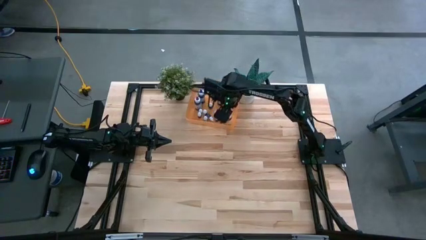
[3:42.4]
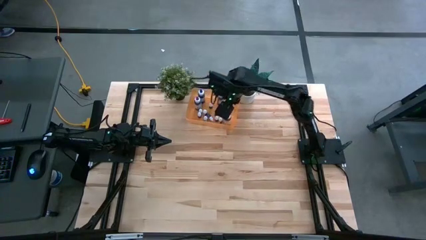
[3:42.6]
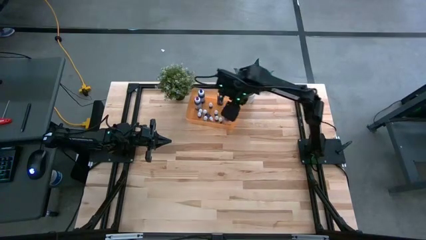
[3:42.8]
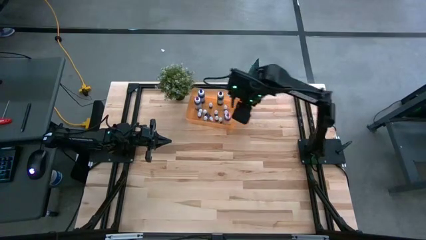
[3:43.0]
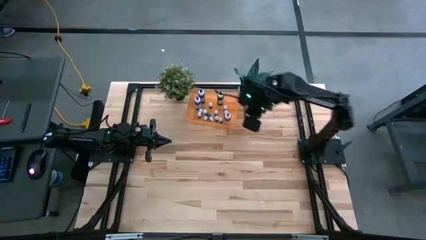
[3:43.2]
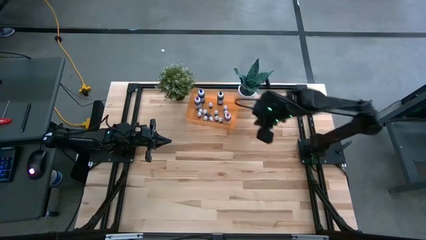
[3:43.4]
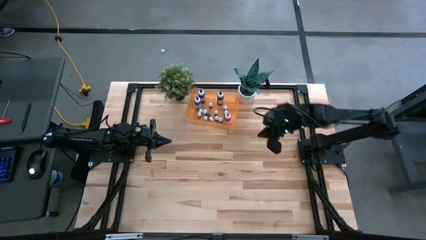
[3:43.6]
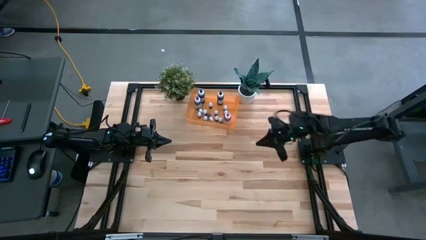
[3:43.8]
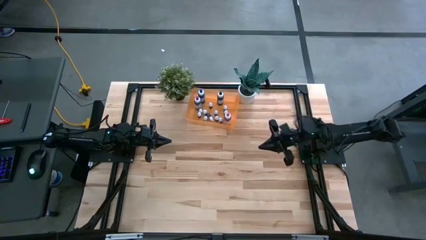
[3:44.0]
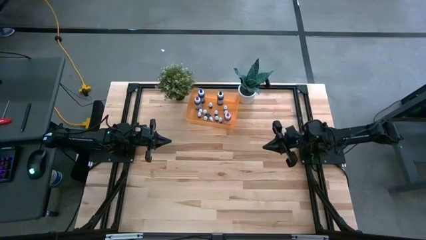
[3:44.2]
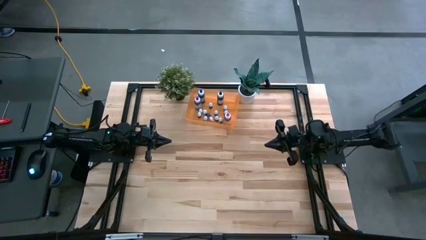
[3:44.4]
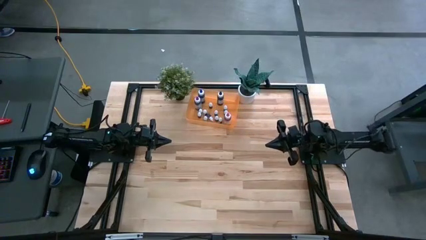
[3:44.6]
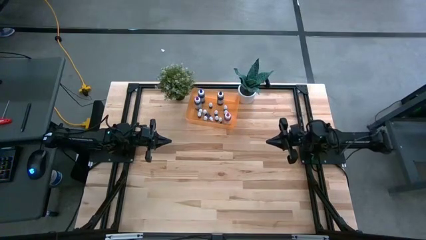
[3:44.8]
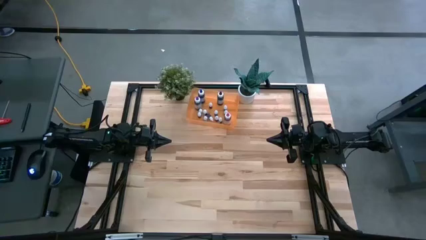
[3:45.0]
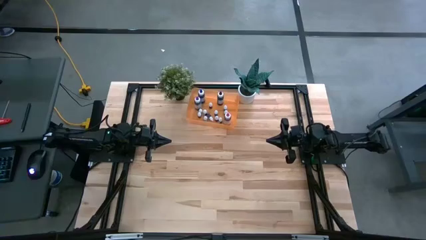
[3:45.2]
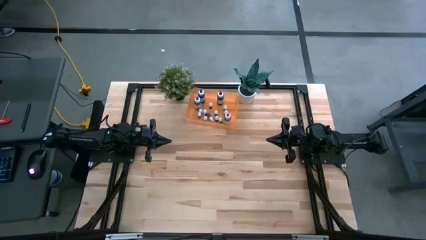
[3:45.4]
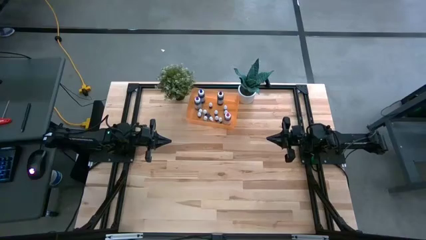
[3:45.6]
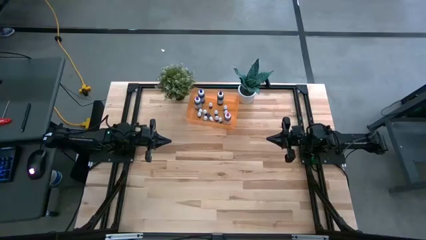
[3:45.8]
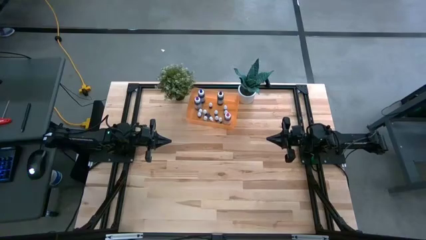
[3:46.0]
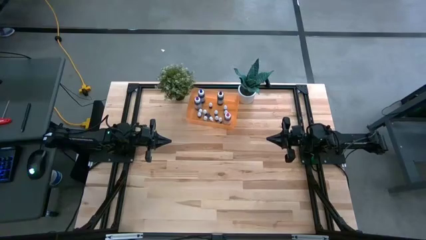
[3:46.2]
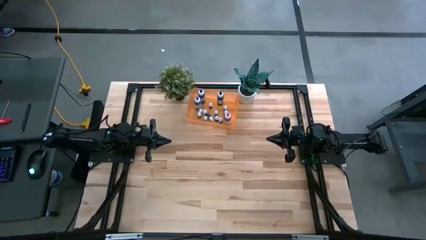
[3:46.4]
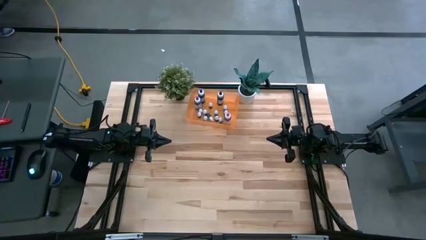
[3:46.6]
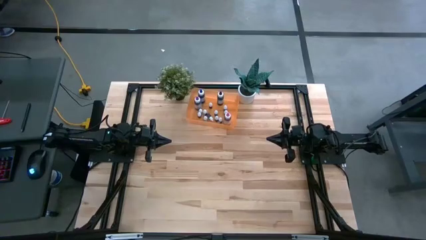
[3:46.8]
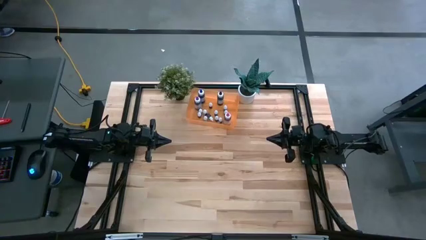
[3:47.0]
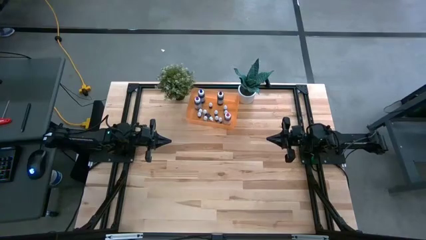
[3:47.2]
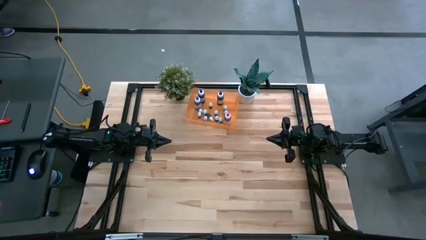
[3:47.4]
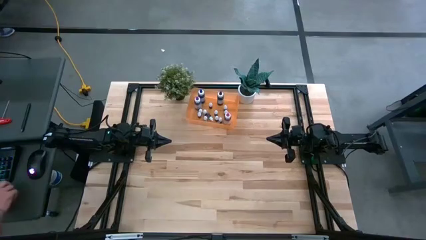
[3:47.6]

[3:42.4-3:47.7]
Task: Pick & Place food coloring
Return to Home Position

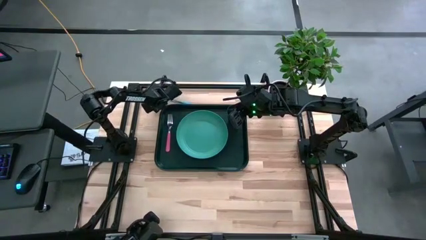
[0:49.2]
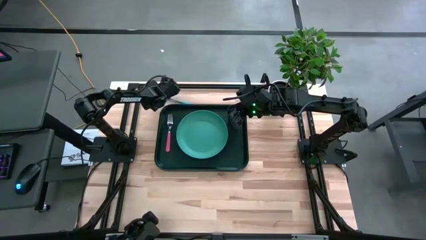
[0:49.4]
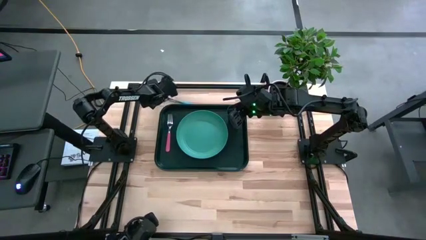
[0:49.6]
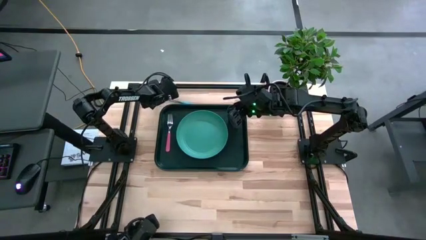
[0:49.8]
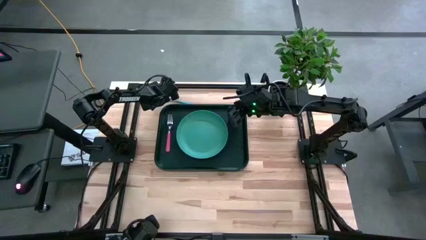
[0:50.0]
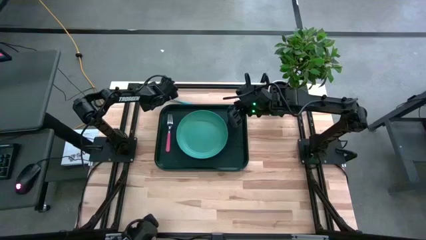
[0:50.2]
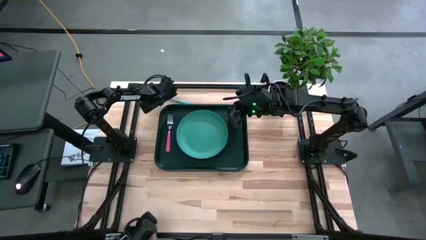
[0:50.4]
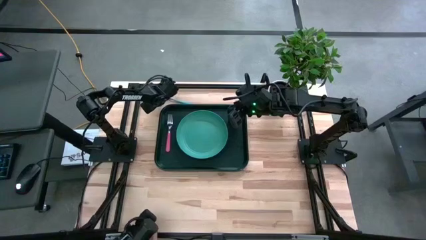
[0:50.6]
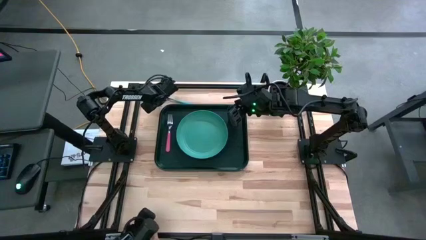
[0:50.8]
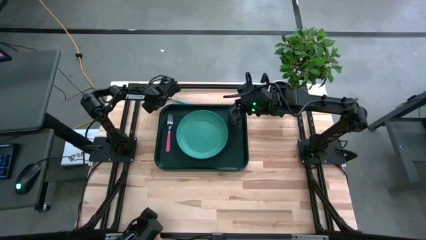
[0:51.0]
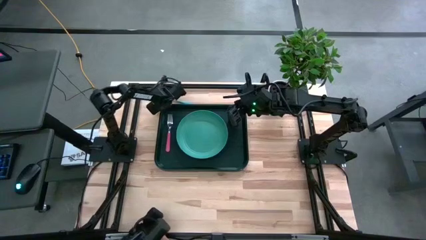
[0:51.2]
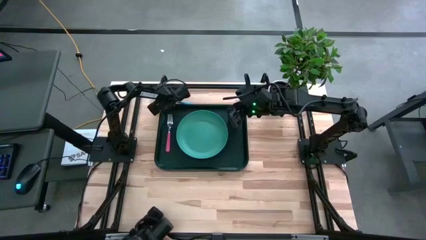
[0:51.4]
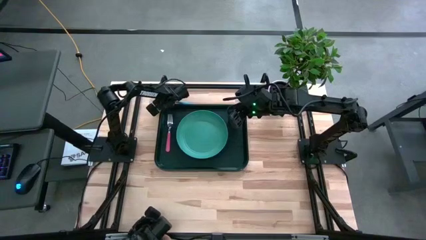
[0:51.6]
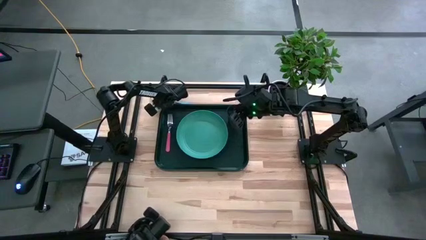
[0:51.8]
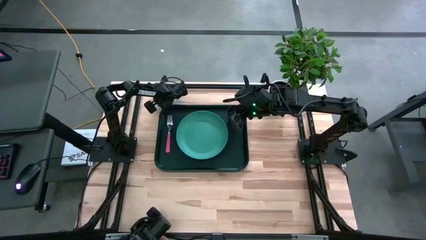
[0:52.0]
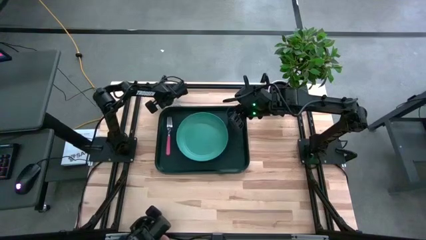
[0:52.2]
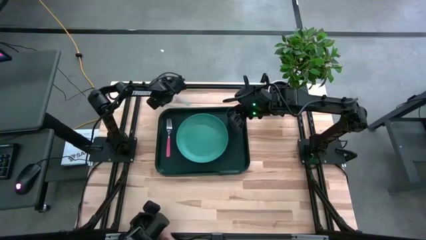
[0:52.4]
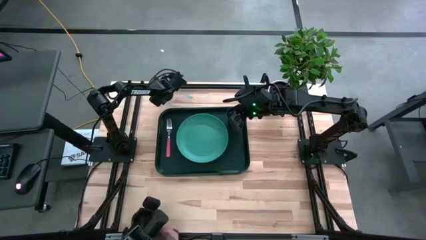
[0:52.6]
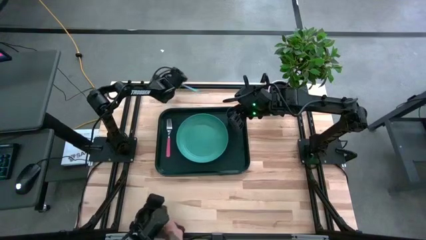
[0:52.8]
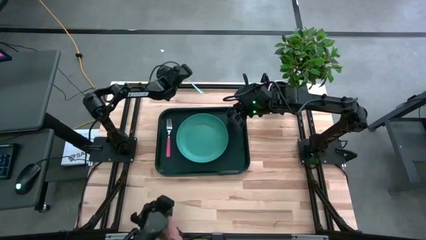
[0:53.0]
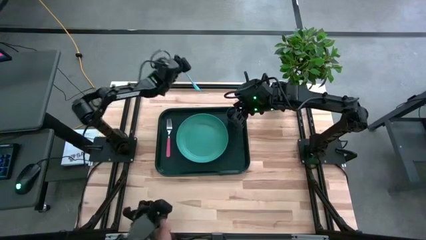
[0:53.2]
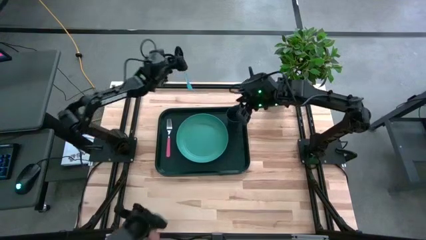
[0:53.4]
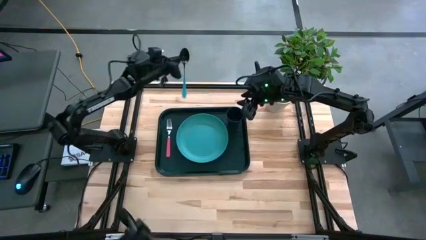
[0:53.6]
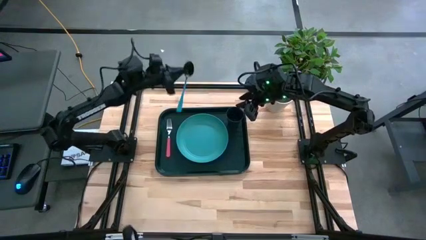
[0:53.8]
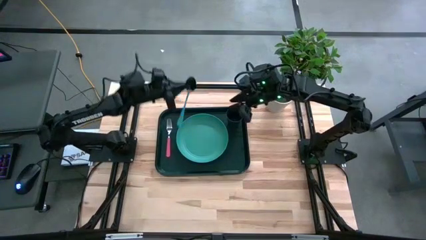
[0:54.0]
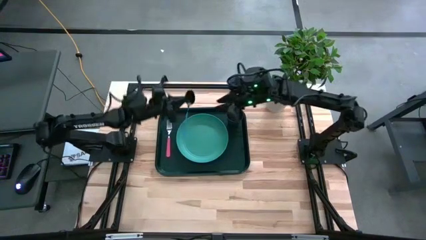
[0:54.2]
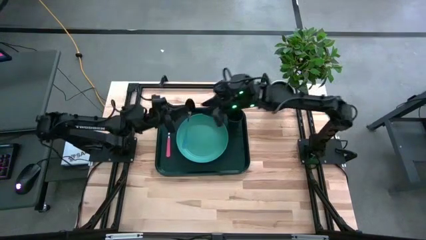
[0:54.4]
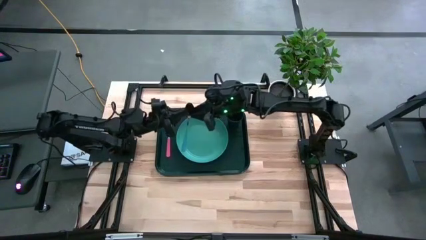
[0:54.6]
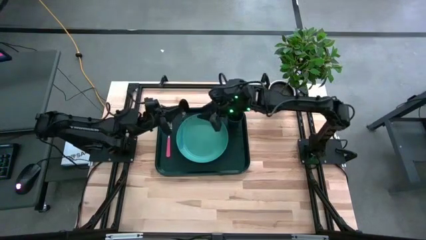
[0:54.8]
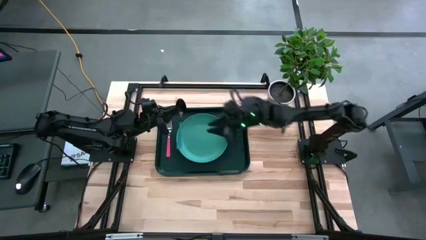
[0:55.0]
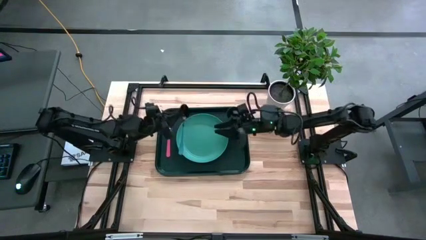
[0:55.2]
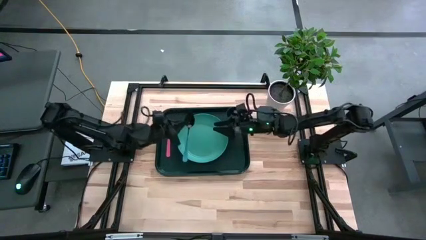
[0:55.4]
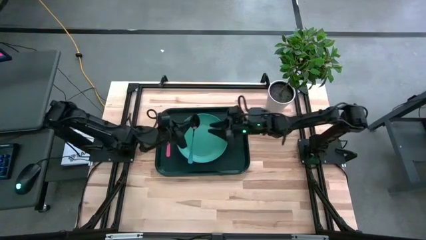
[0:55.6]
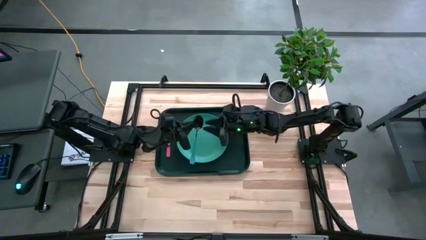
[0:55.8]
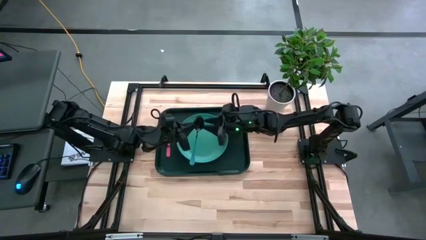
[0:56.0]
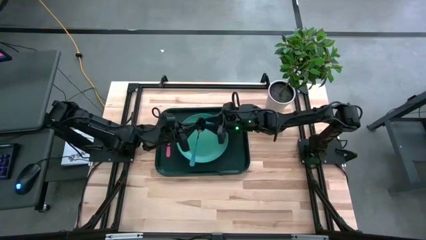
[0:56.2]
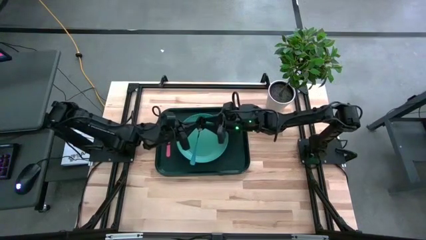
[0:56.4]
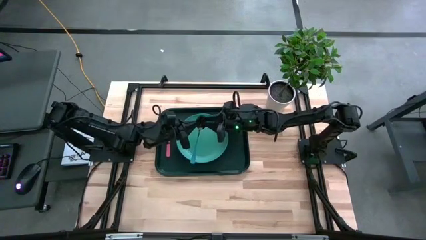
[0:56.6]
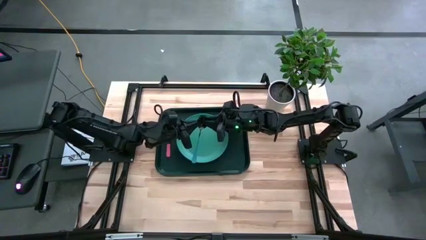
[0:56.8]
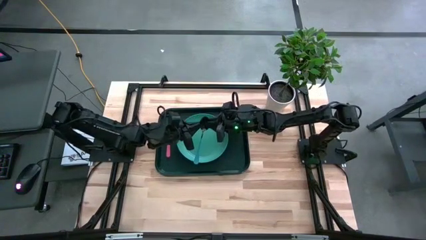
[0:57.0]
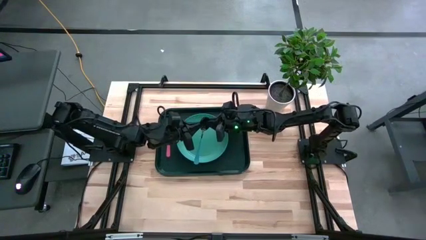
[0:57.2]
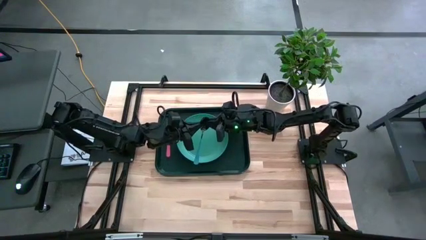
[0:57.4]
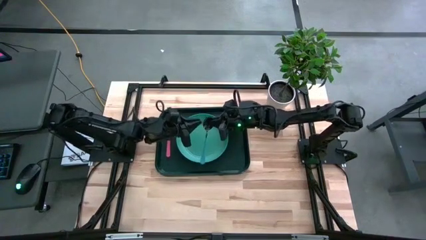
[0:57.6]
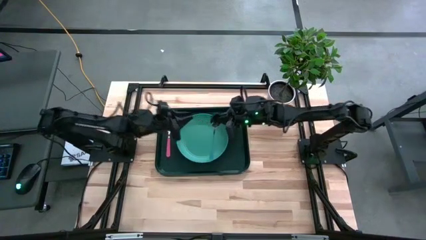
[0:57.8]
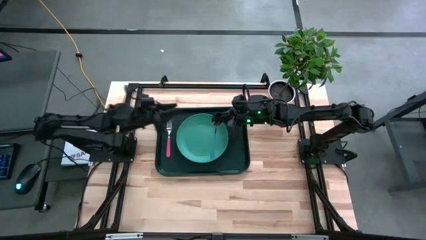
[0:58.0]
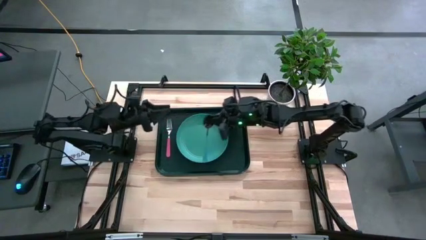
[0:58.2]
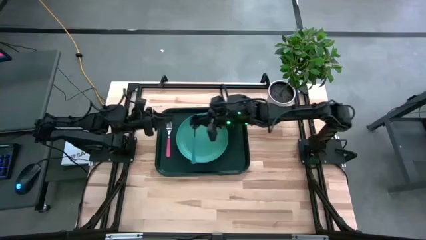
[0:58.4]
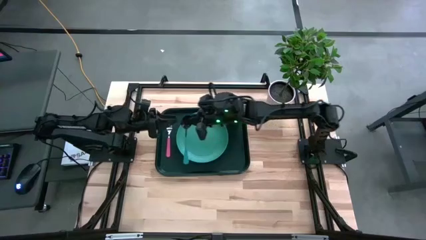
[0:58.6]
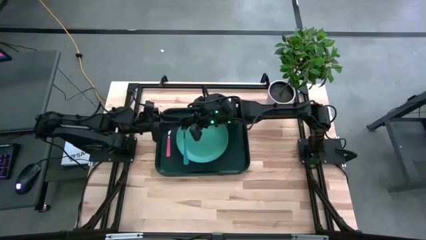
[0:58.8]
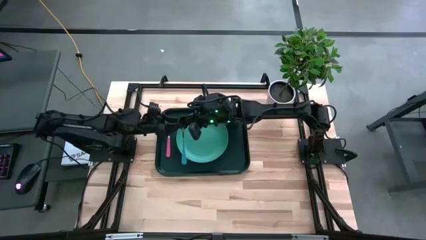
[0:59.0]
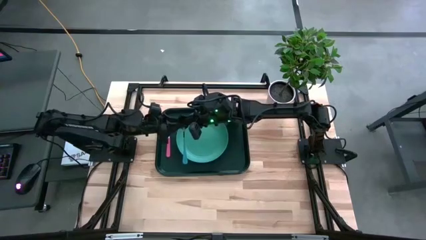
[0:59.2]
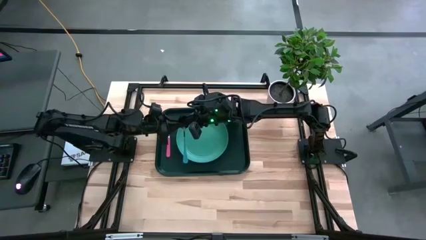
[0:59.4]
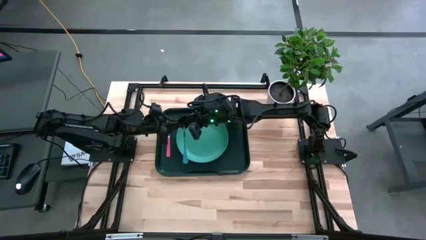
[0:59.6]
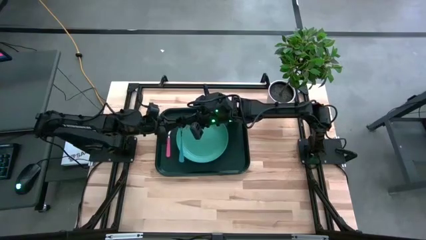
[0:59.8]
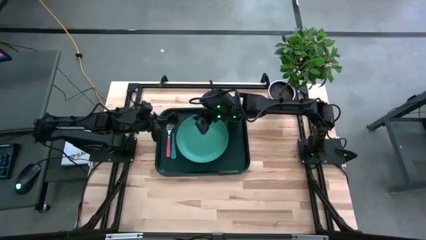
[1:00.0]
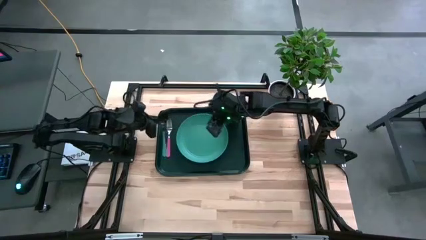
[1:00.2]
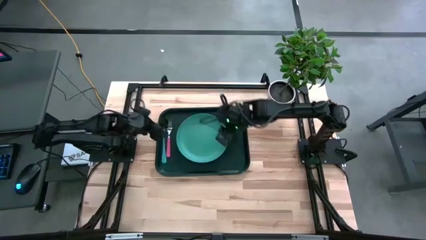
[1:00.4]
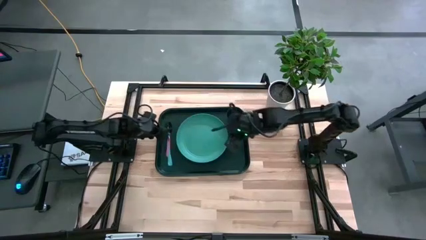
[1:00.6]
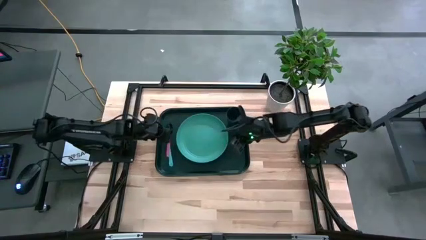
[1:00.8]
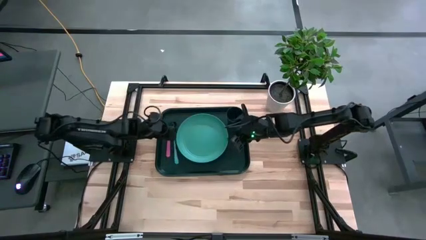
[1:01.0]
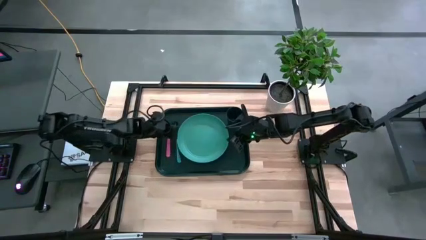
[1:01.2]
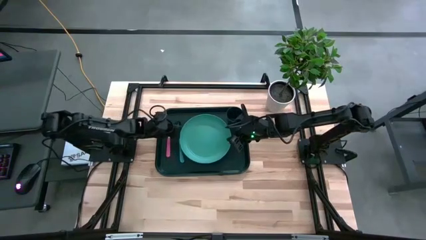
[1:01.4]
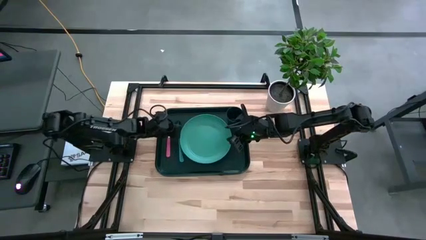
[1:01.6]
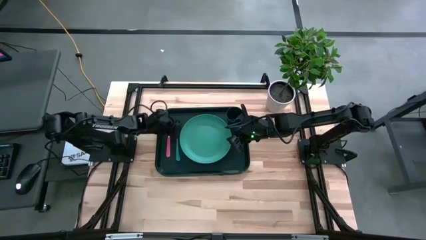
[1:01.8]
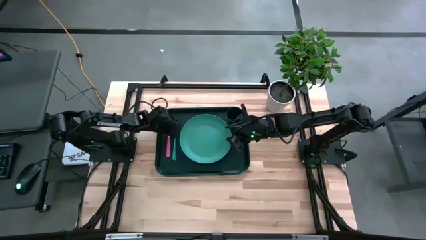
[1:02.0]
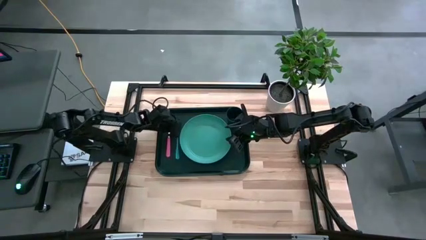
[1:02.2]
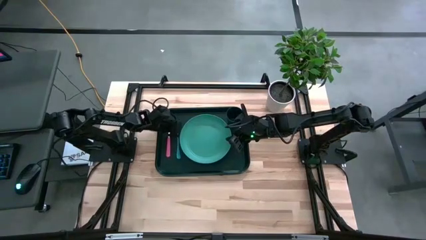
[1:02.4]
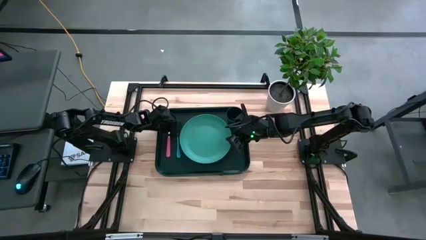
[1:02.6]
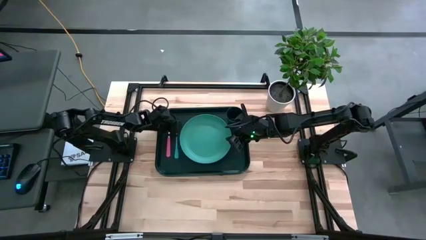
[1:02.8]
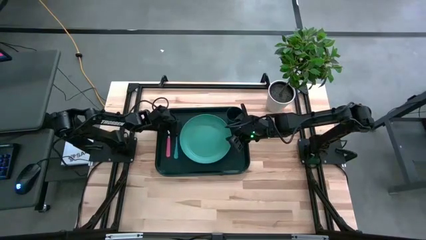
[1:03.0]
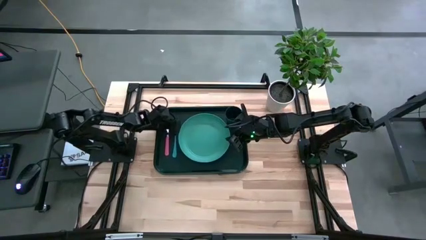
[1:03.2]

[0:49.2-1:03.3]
Task: Pick and place plate/cup/fork/spoon on tray
Put the light blue spoon on the black serving tray to the right of the pink fork
